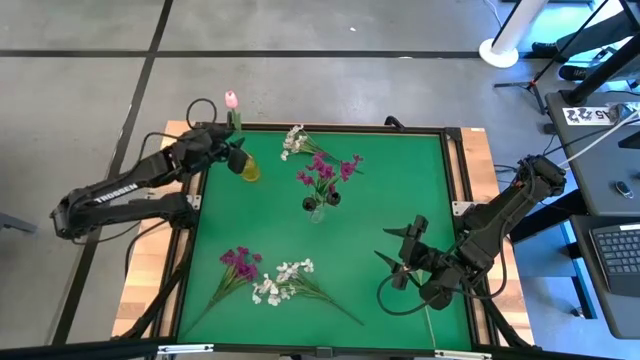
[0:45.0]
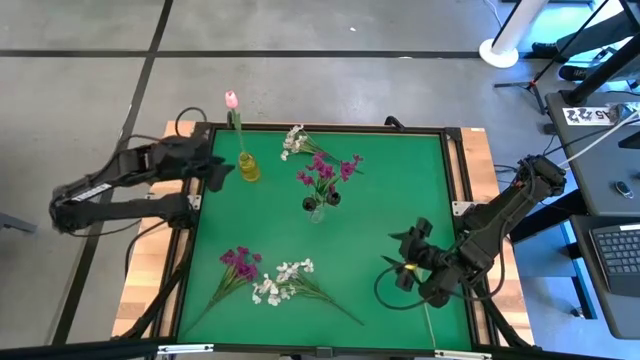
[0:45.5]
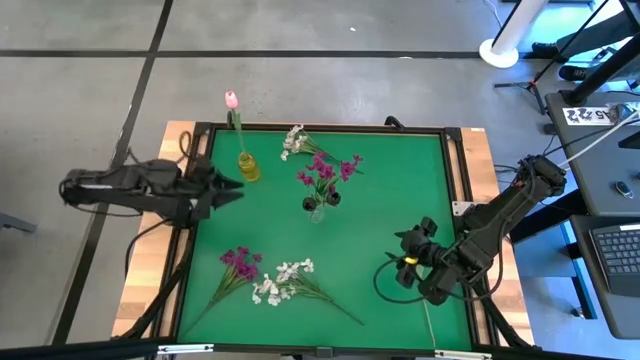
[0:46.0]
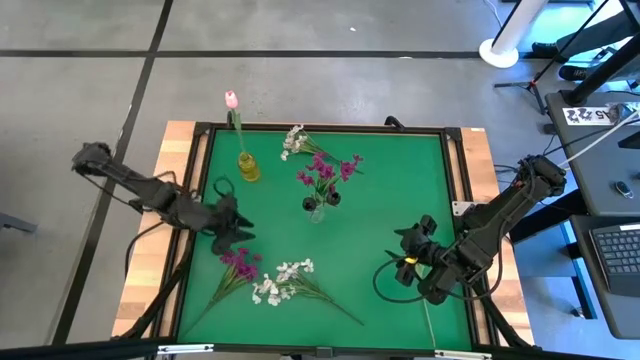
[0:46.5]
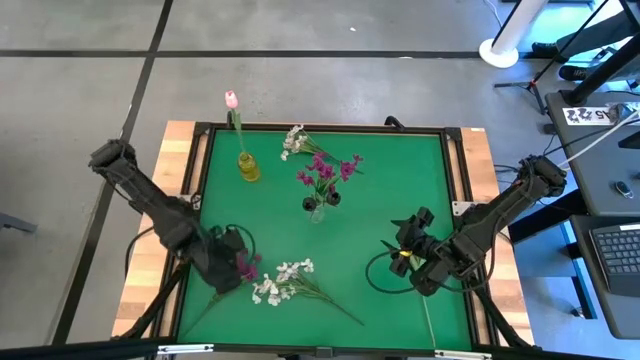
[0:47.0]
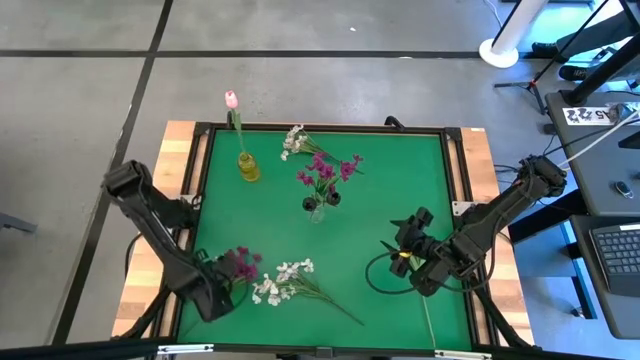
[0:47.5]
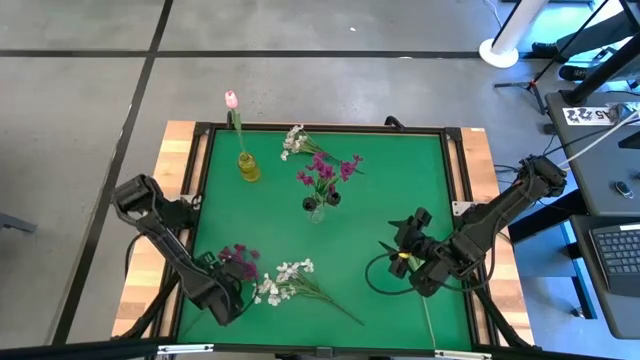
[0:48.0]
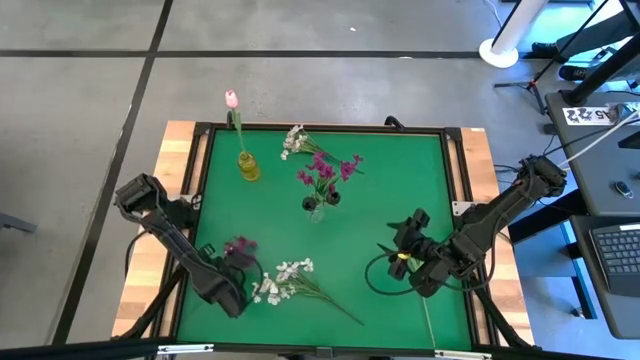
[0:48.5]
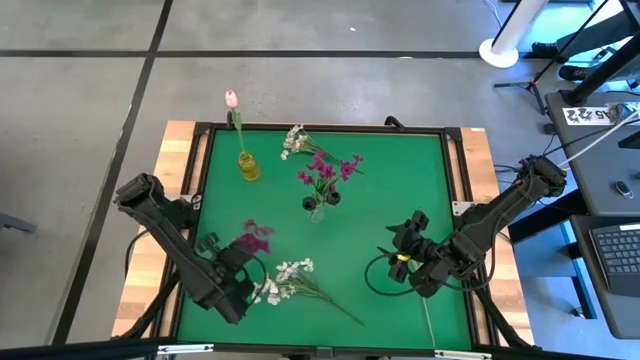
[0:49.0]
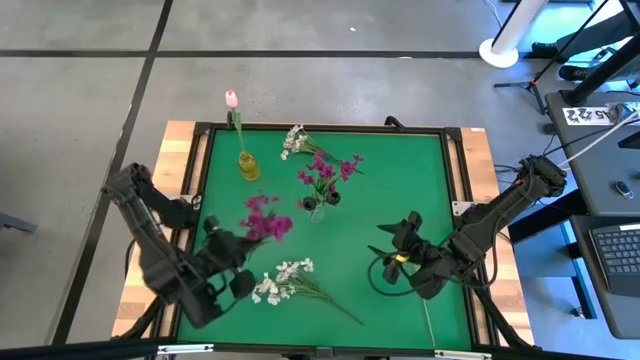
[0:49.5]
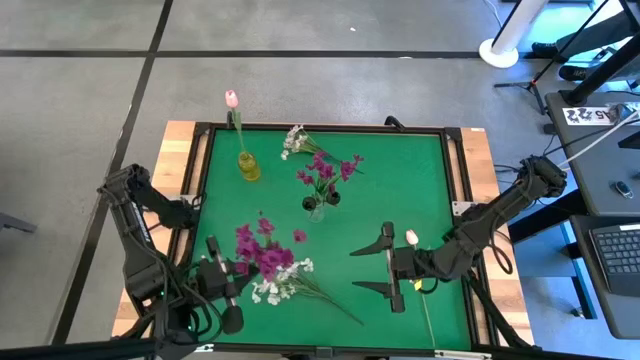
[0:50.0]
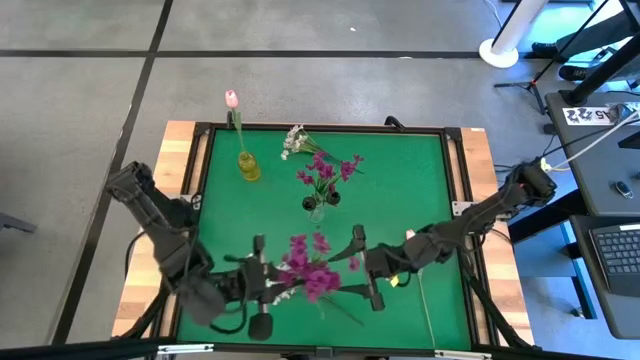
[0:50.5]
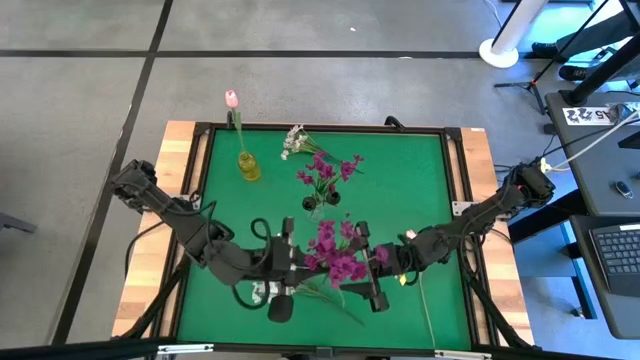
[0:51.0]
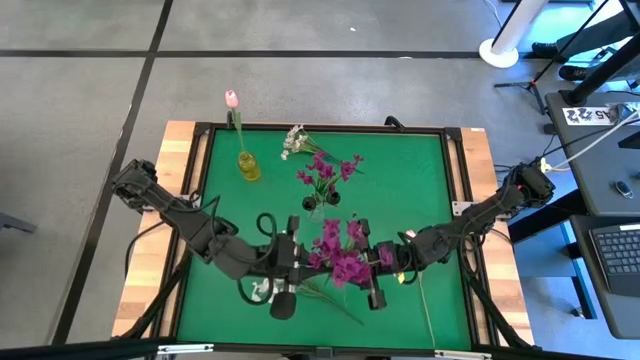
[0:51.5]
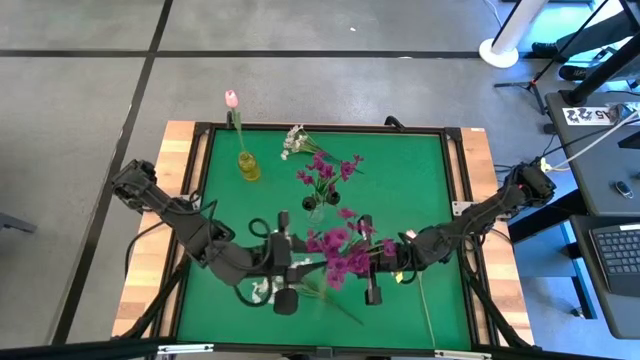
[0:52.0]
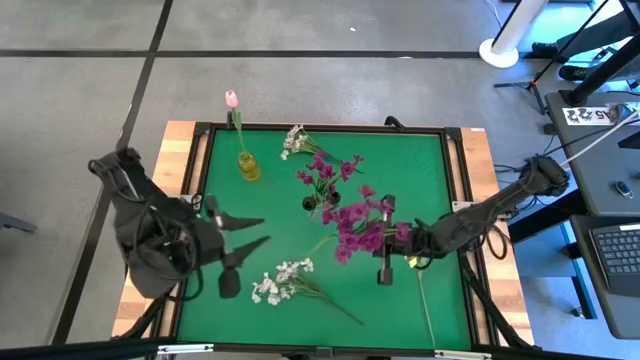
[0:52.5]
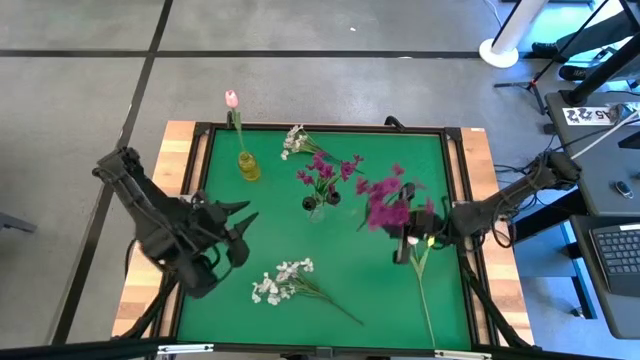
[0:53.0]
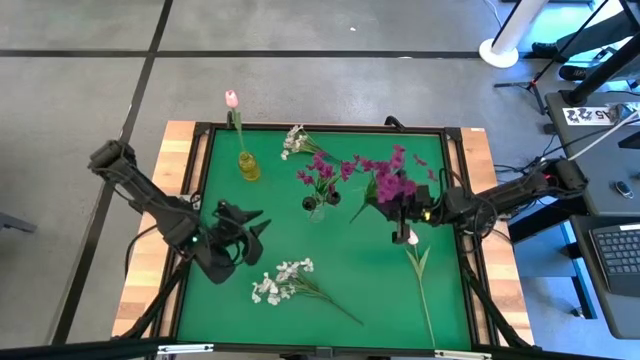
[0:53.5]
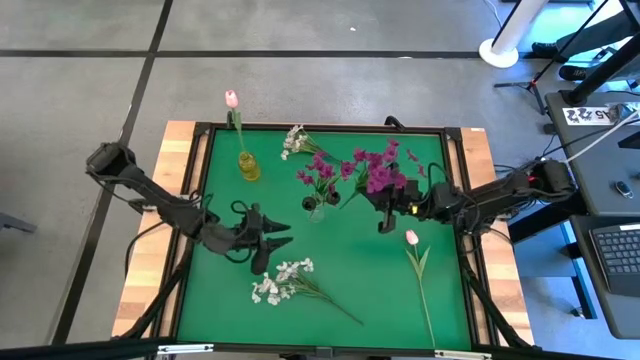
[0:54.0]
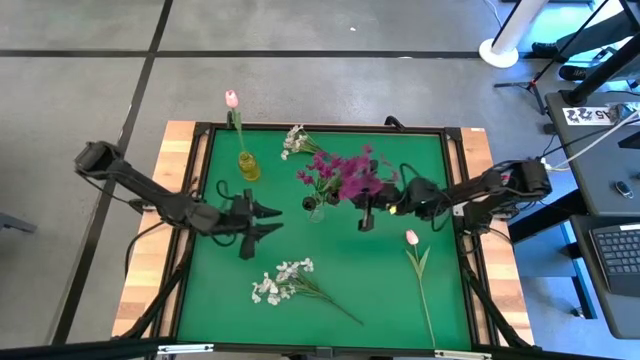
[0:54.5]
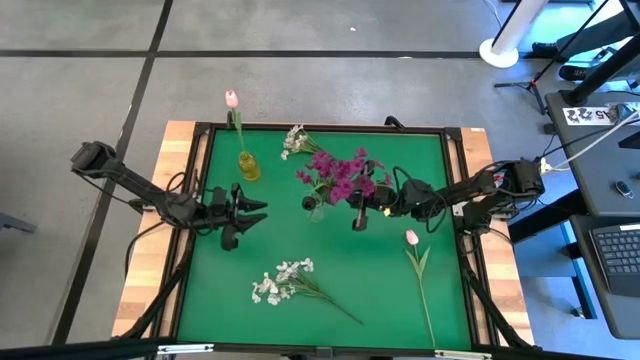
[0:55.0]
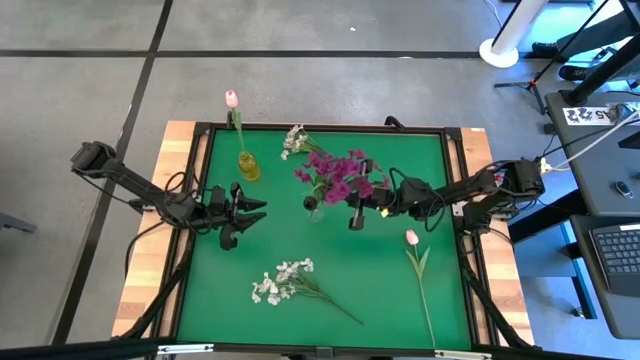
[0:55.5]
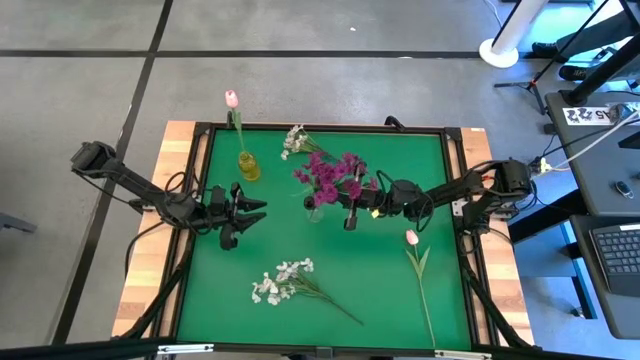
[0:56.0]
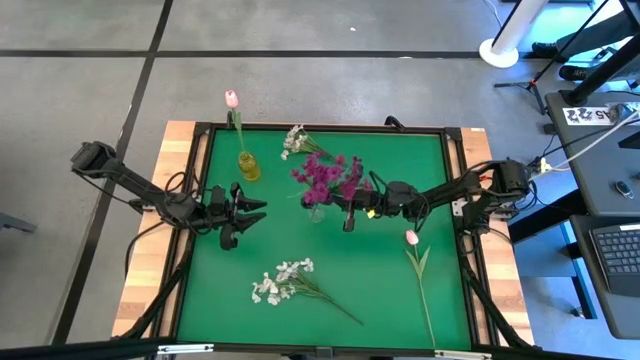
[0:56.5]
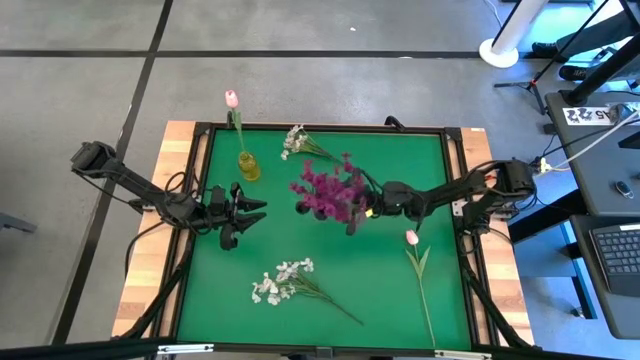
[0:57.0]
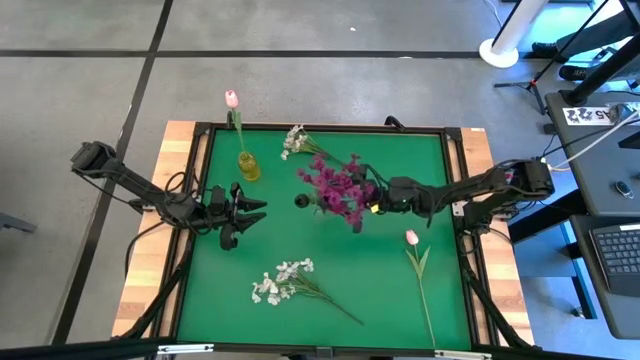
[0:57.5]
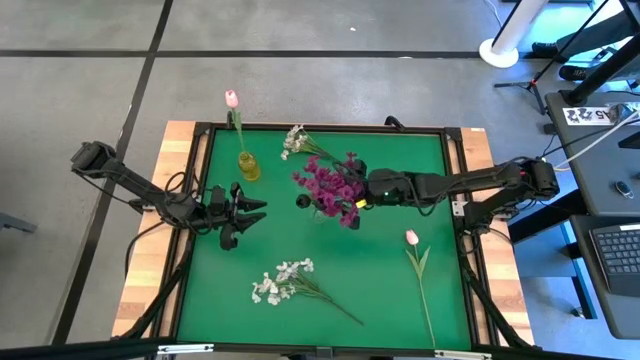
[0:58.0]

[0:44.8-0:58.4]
Task: Sort flowers into vase by color
Put the violet flowers into the transparent vase

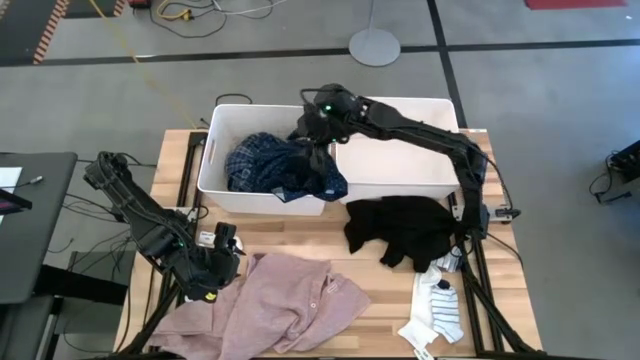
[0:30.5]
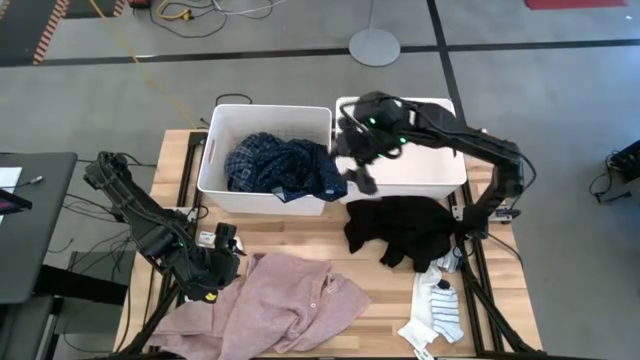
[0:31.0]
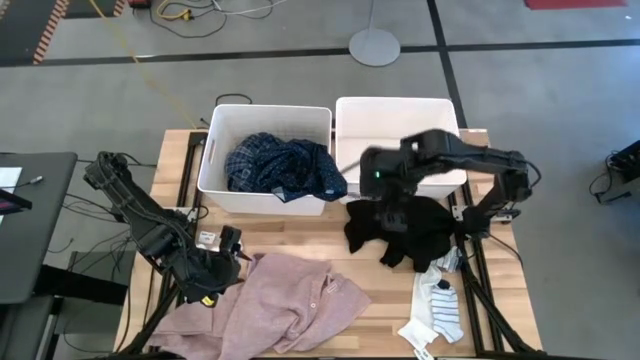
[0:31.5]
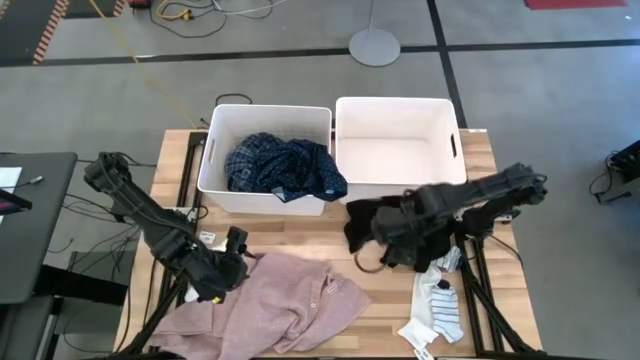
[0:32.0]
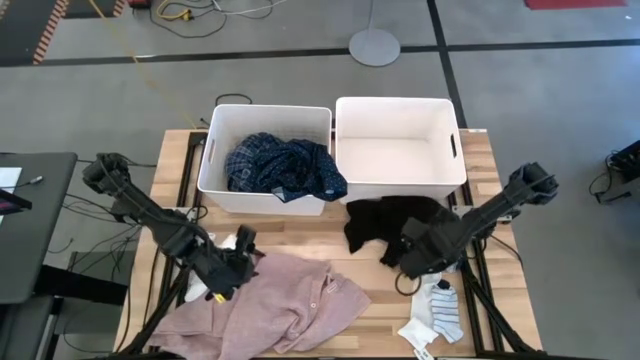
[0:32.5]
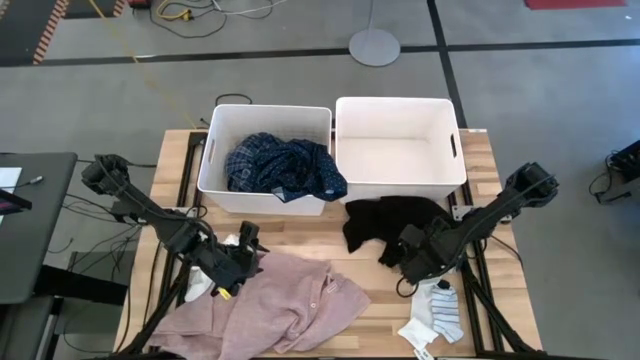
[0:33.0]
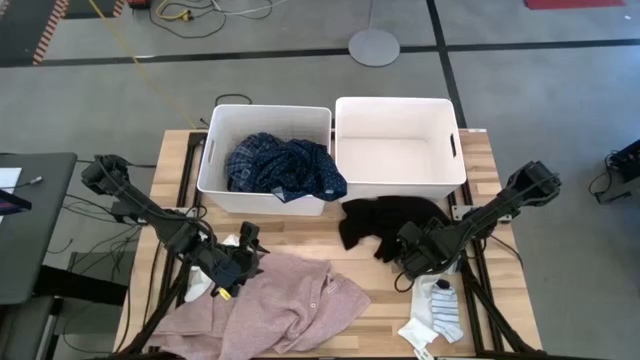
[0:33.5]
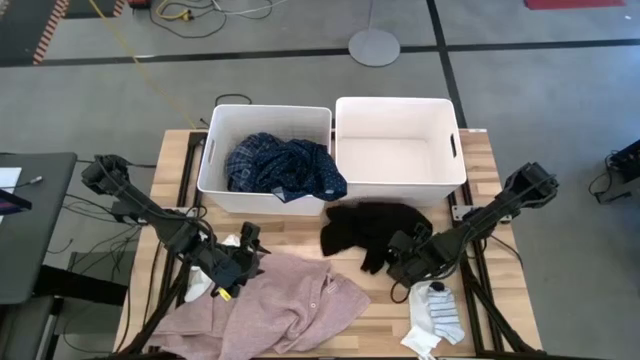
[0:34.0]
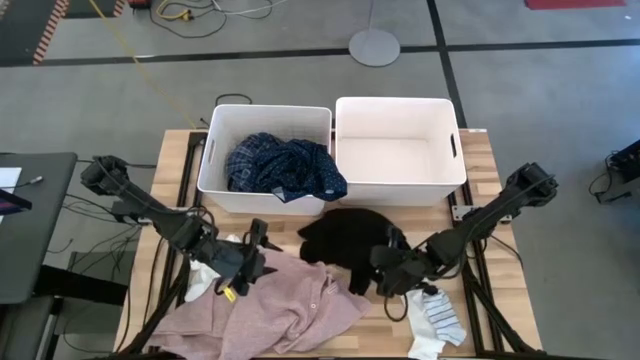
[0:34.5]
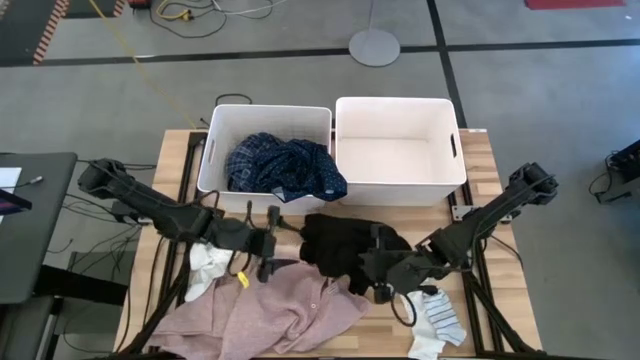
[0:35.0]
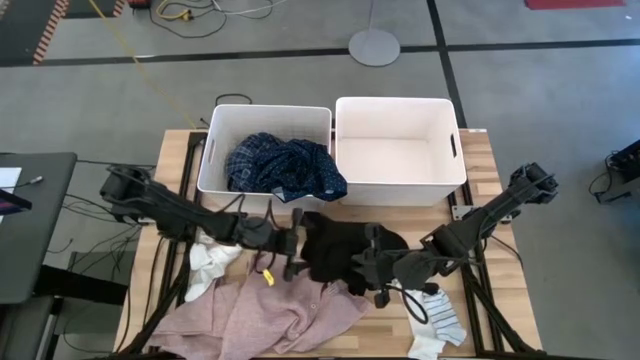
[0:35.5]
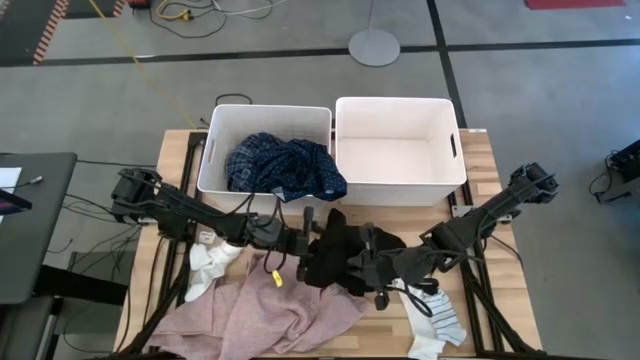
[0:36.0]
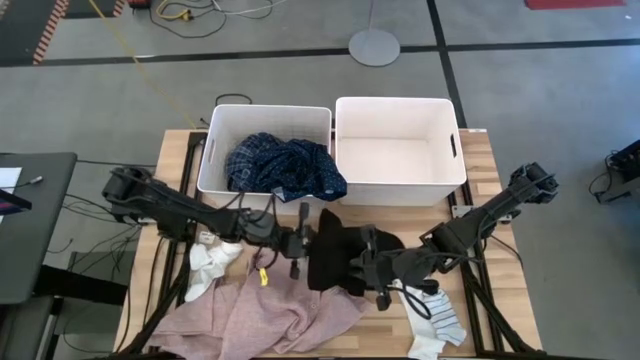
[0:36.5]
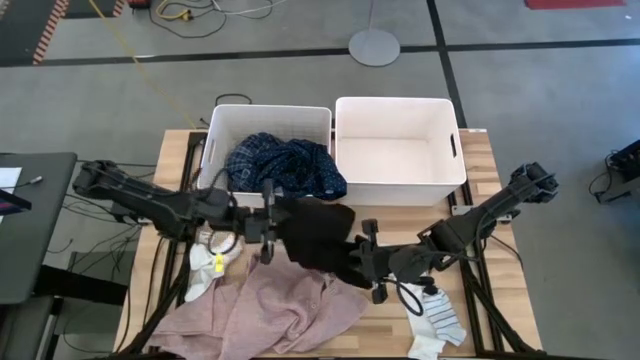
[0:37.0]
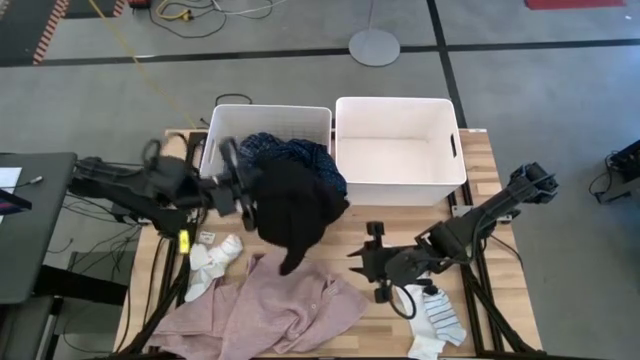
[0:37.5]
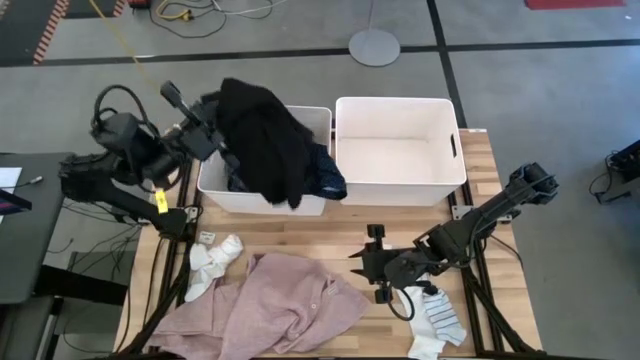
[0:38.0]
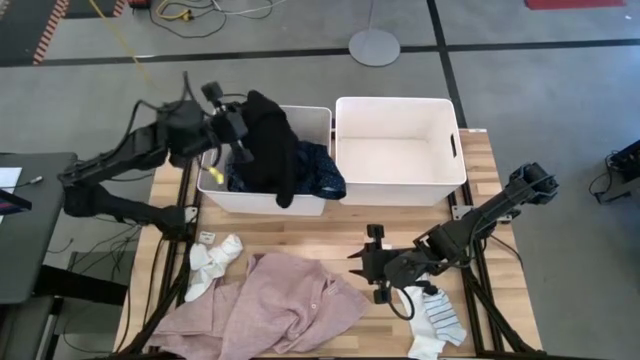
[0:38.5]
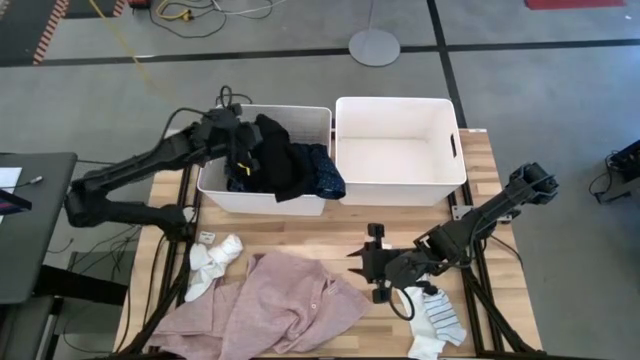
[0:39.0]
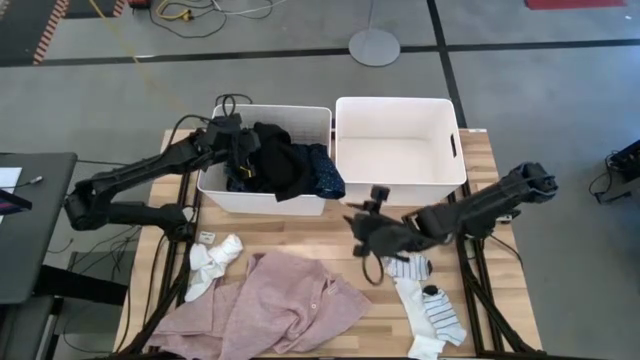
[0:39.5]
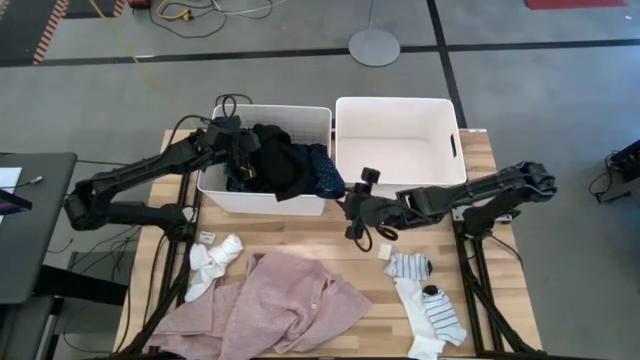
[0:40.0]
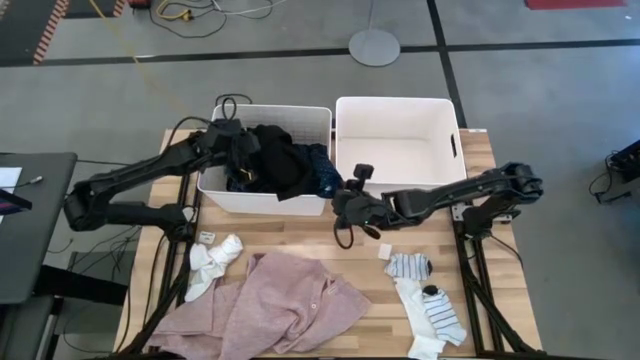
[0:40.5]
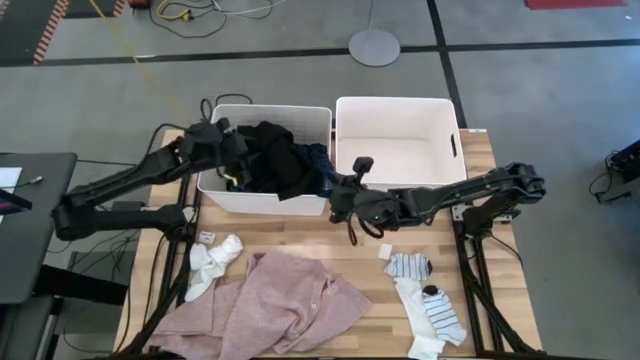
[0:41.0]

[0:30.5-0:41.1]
Task: Sort clothes
Put the black pants into the left white laundry bin
